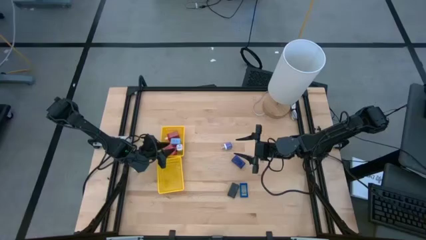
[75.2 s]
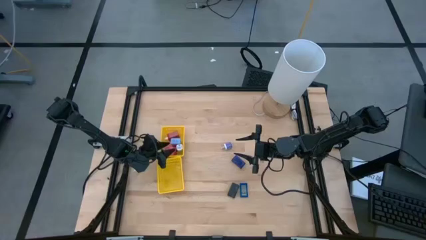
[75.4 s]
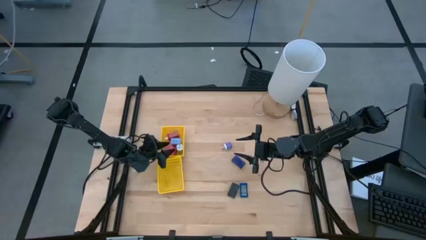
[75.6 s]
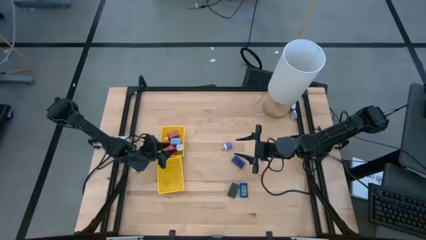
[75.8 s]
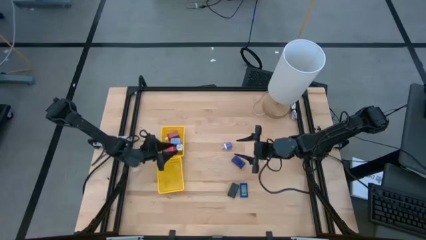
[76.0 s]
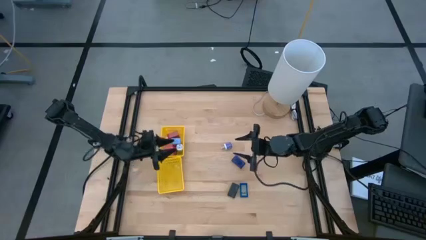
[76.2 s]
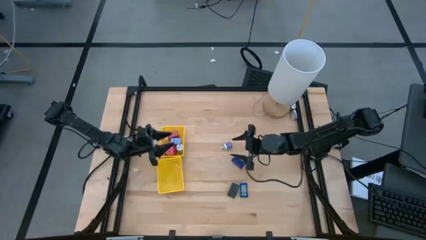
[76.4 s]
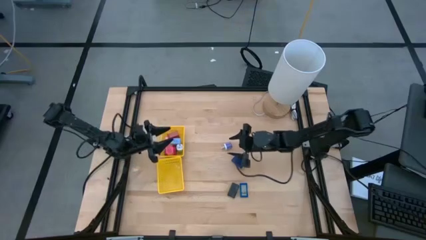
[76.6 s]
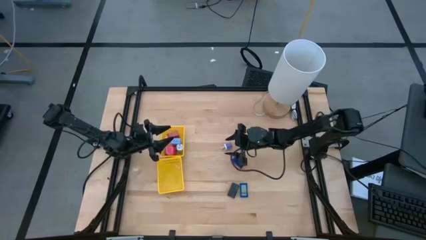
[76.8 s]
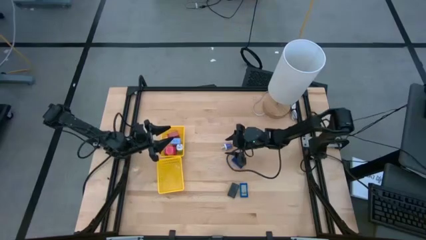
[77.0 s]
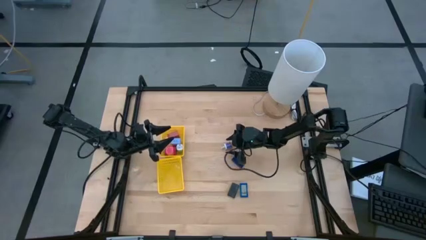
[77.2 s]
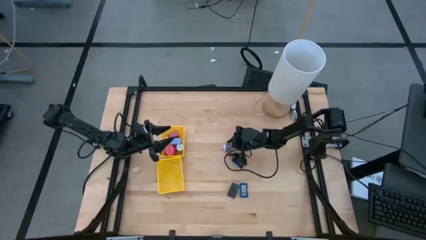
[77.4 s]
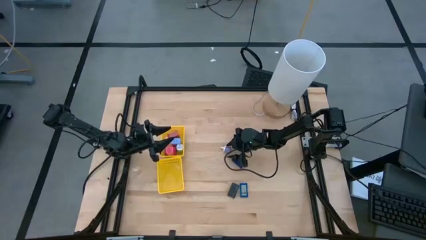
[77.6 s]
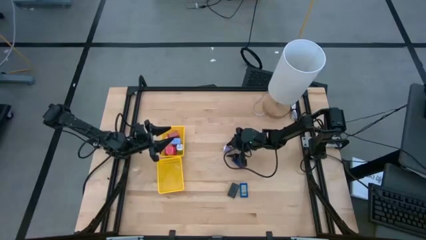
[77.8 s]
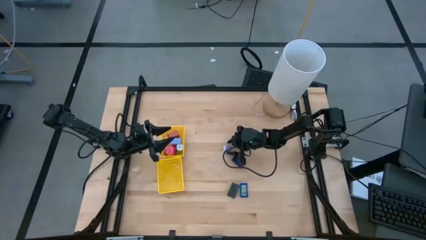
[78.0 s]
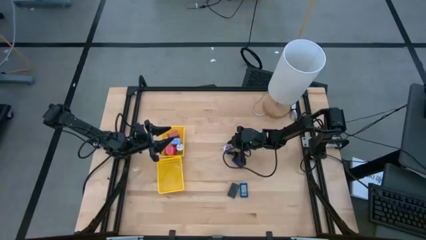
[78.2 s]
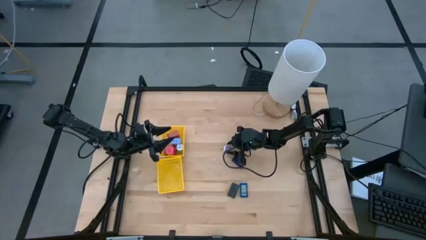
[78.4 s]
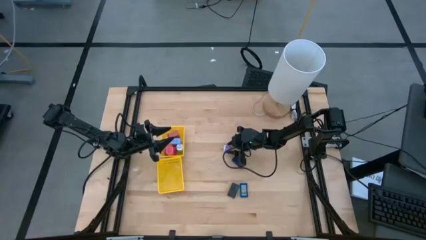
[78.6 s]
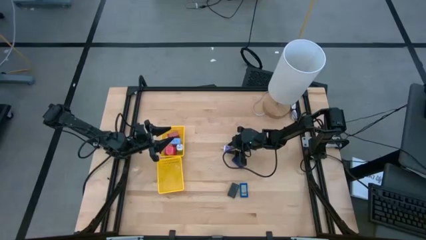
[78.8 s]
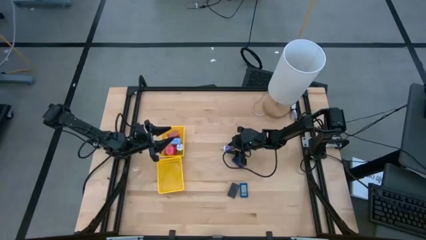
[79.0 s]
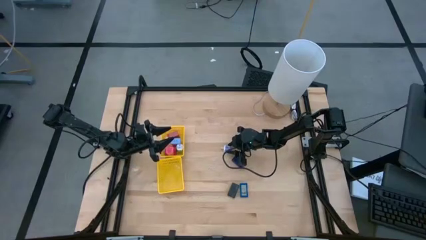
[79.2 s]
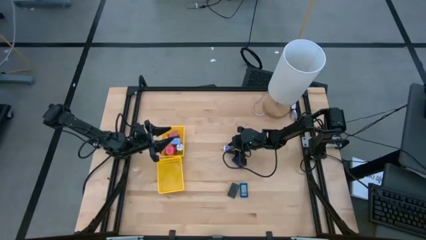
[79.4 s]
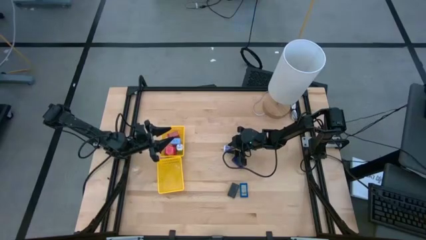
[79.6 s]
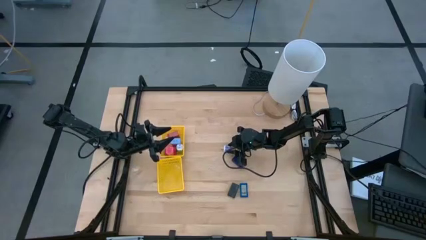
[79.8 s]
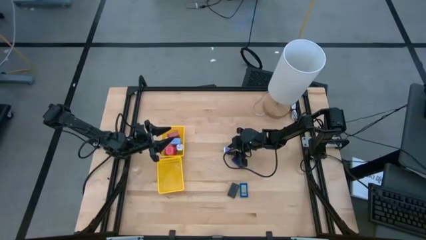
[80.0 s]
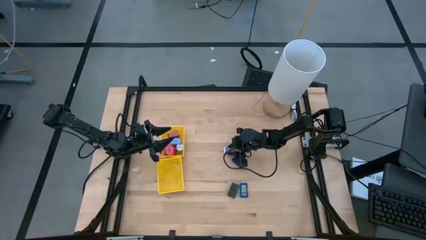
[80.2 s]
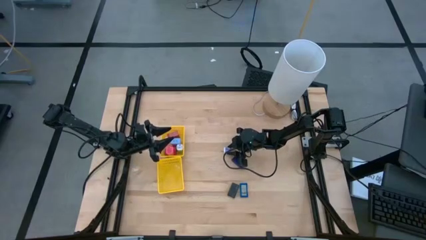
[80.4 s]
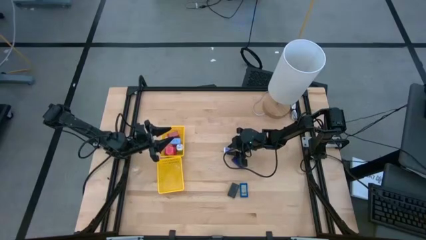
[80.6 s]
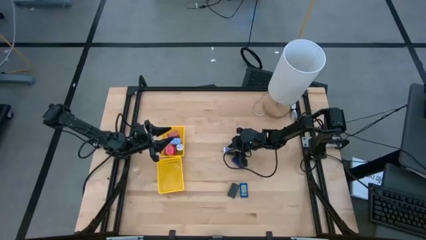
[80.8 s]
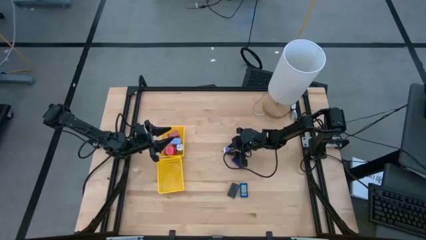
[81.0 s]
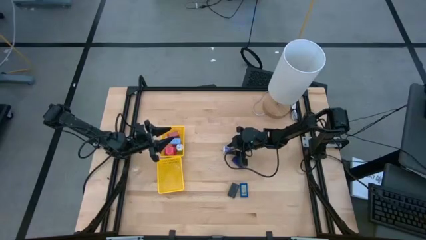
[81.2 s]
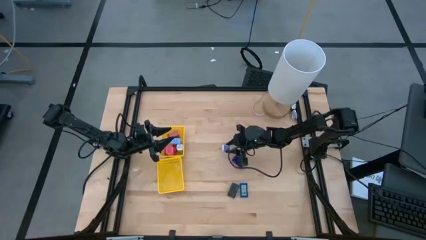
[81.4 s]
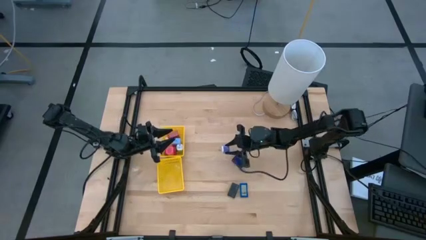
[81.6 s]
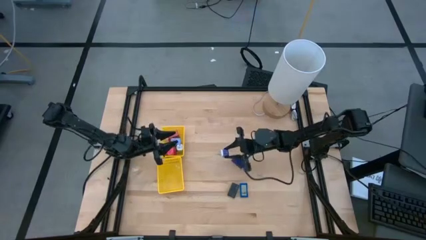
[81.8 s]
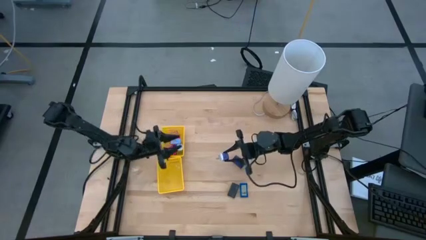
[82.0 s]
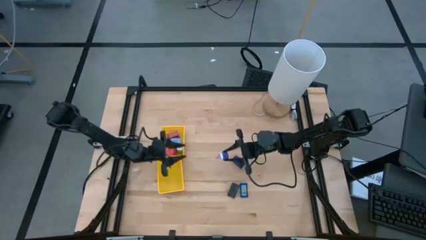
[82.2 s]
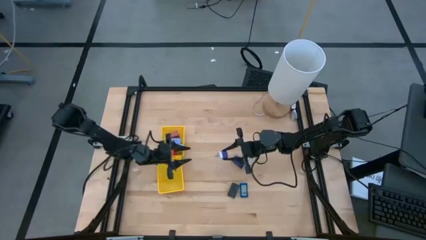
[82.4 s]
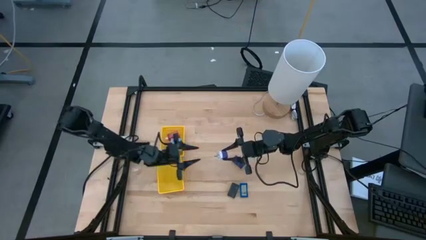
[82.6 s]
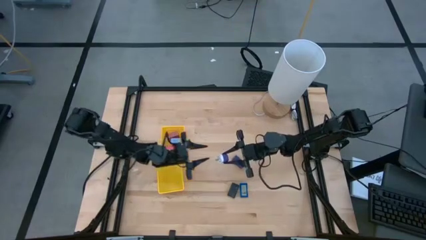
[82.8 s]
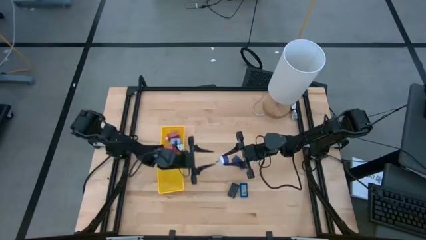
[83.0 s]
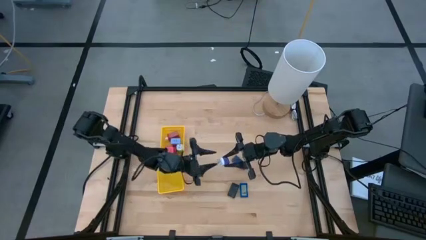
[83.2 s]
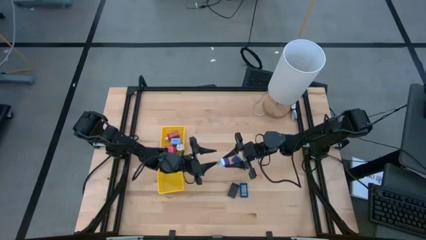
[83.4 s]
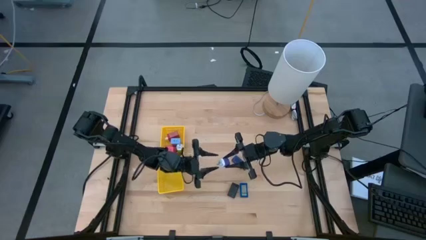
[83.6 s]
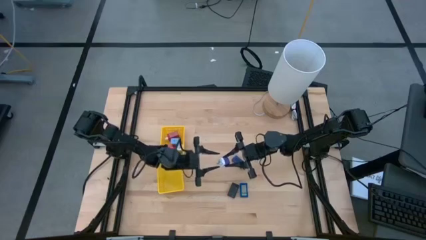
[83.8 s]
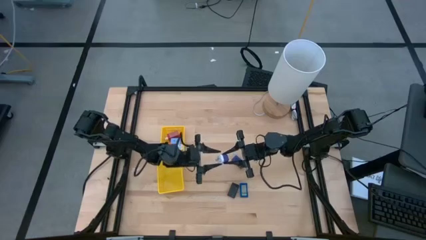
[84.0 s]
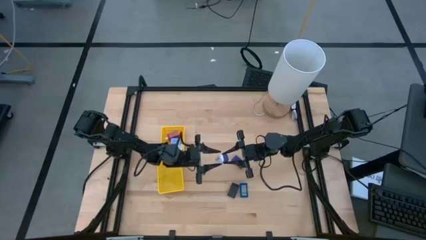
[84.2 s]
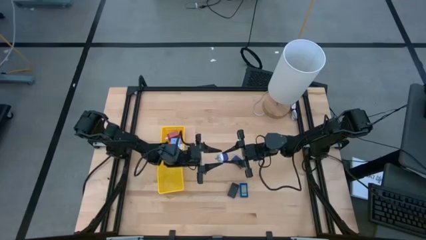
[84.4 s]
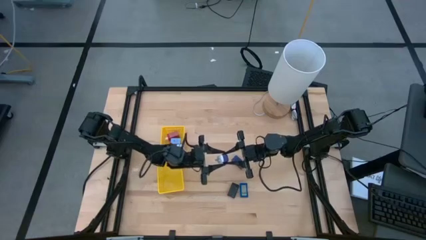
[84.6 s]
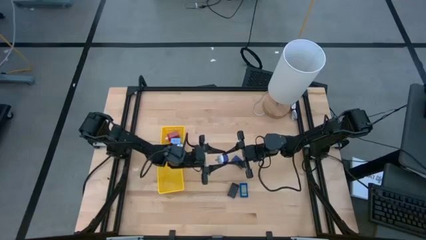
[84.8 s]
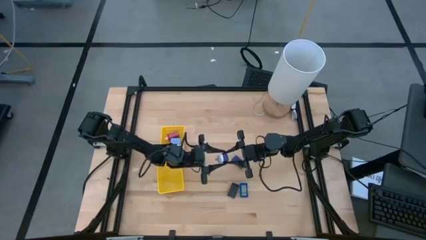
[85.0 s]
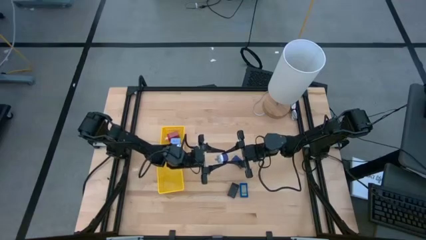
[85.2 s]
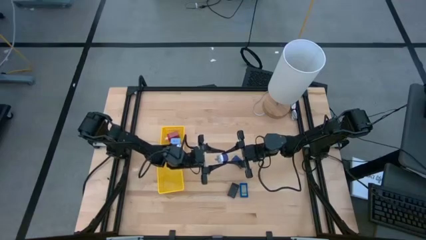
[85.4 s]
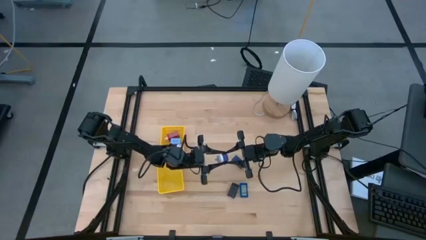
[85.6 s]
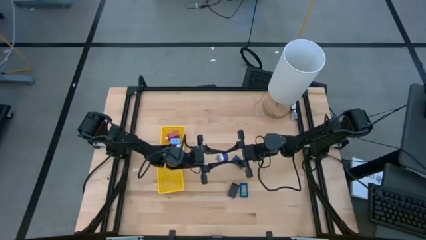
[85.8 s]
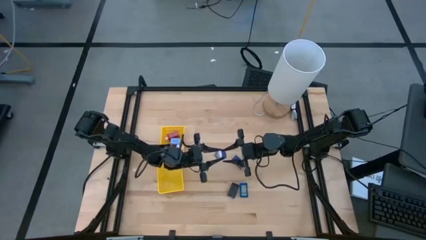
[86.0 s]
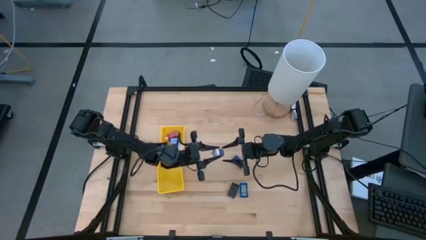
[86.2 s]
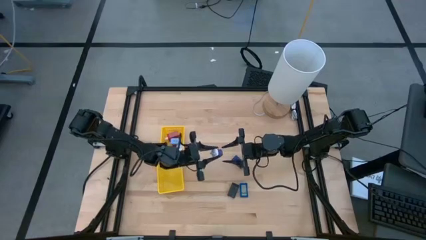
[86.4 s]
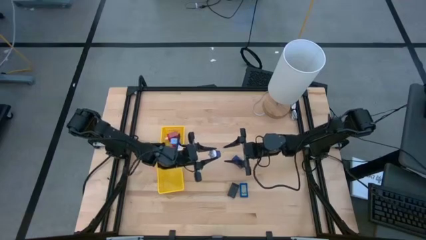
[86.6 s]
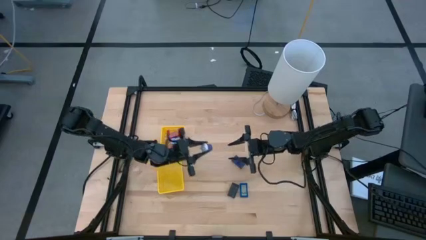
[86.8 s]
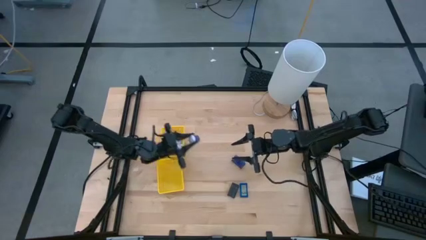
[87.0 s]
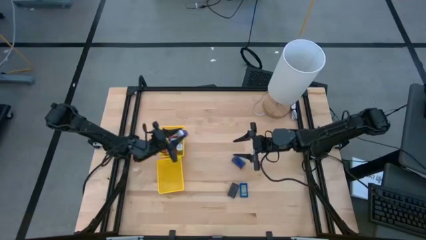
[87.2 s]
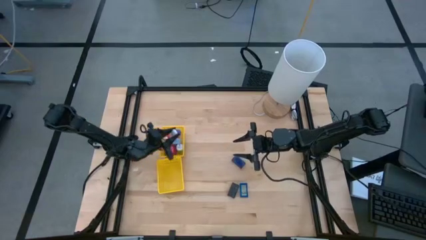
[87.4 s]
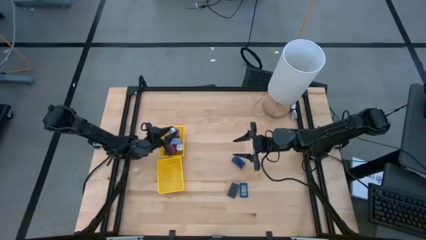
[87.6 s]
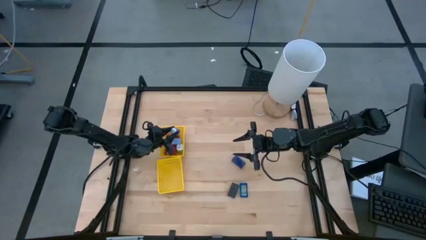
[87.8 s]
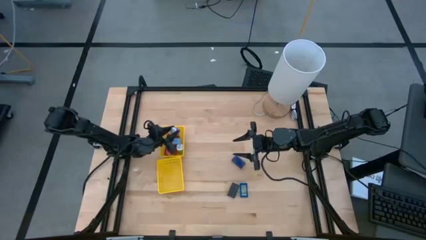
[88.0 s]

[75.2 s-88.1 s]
Task: Pick & Place Office items
Put the blue charger adapter into the top yellow bin
